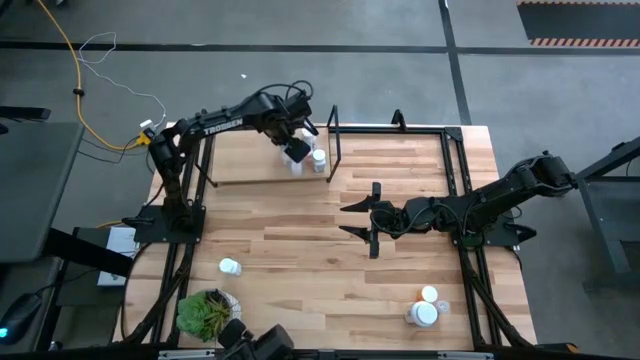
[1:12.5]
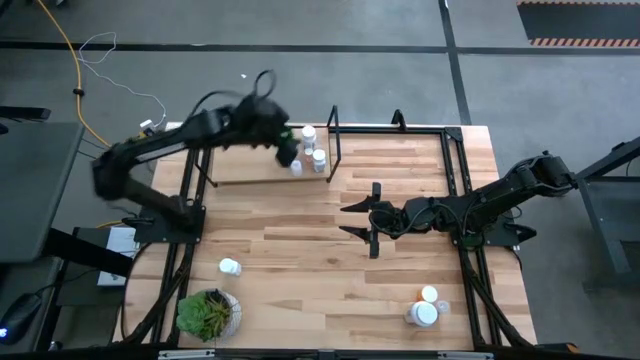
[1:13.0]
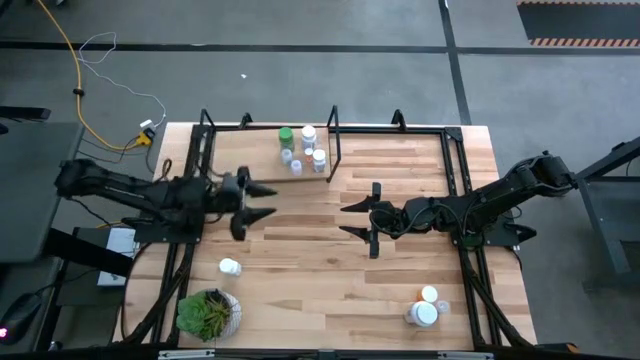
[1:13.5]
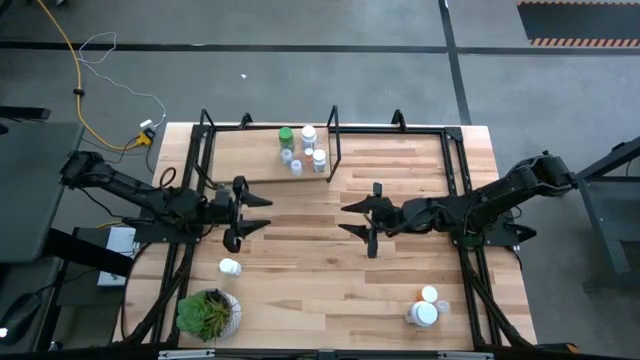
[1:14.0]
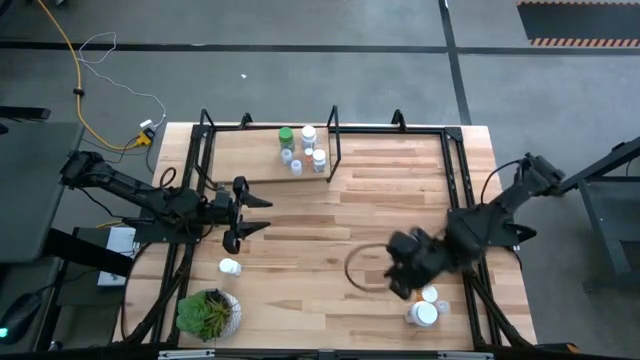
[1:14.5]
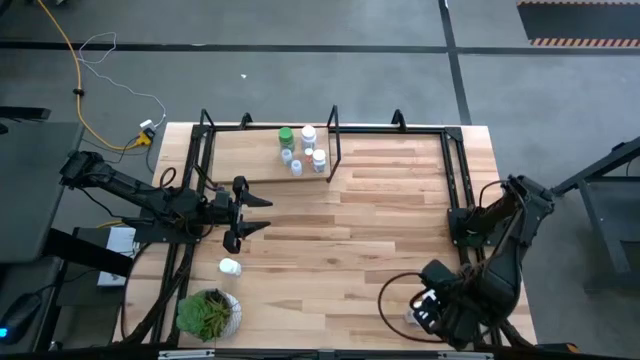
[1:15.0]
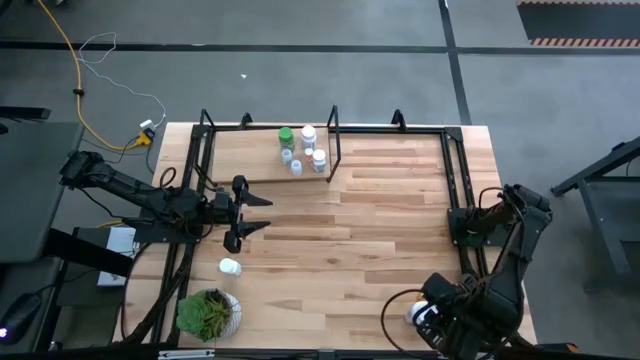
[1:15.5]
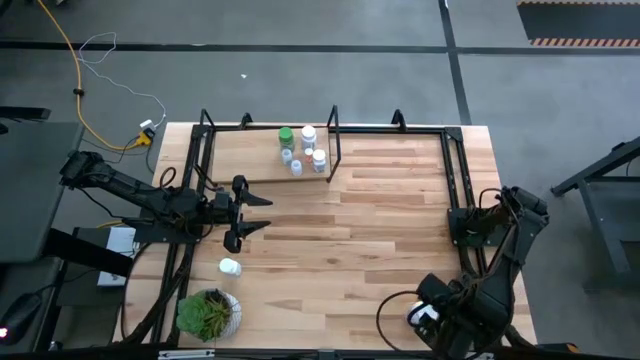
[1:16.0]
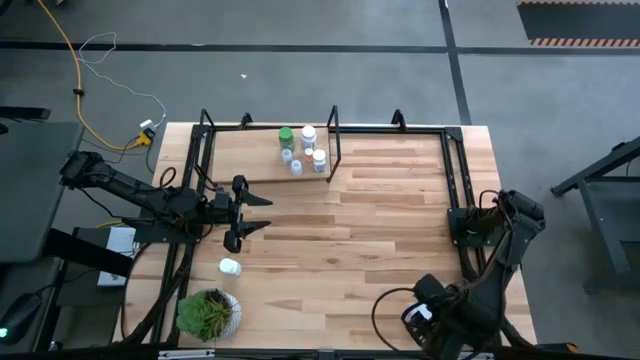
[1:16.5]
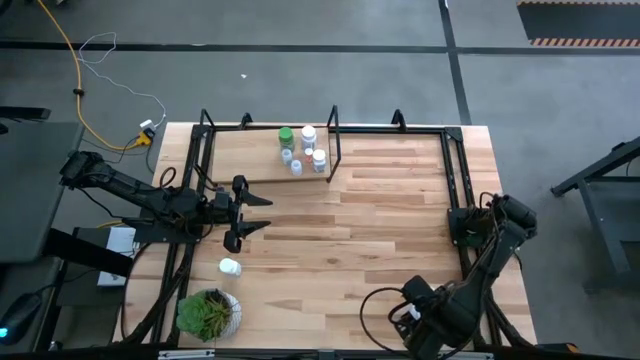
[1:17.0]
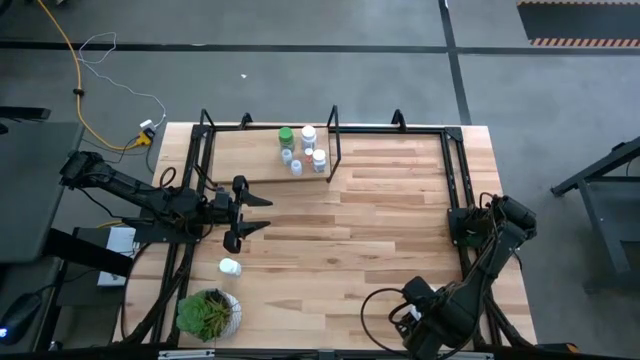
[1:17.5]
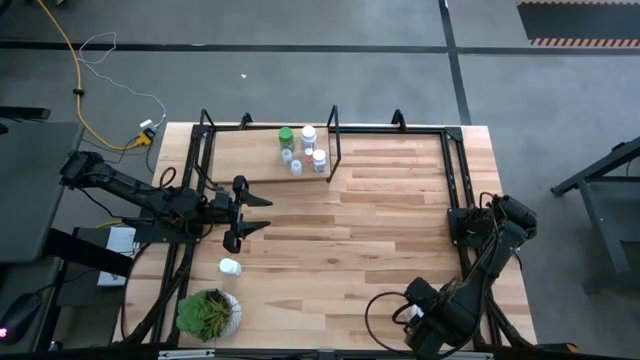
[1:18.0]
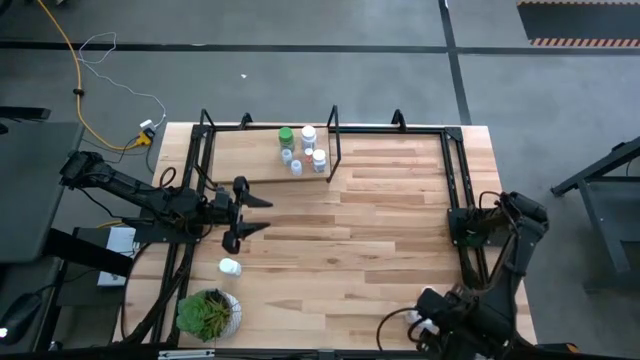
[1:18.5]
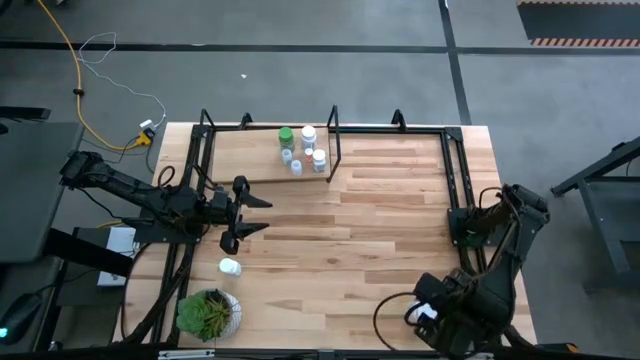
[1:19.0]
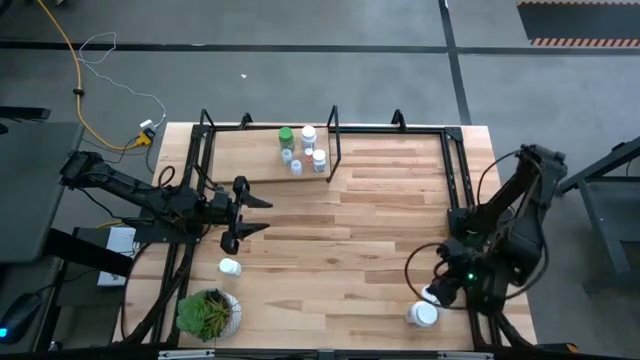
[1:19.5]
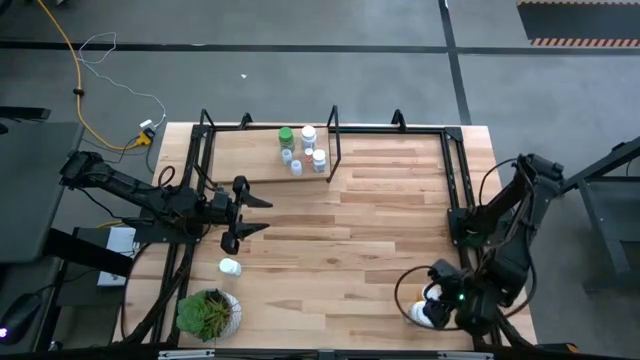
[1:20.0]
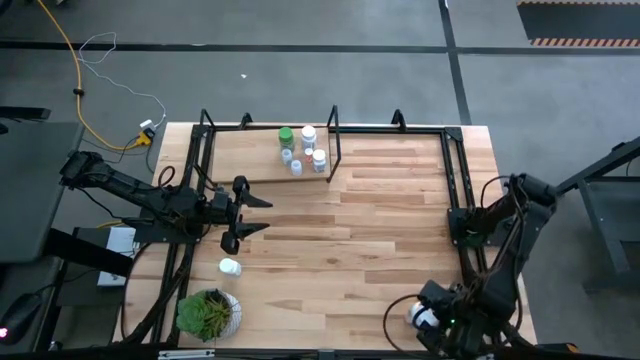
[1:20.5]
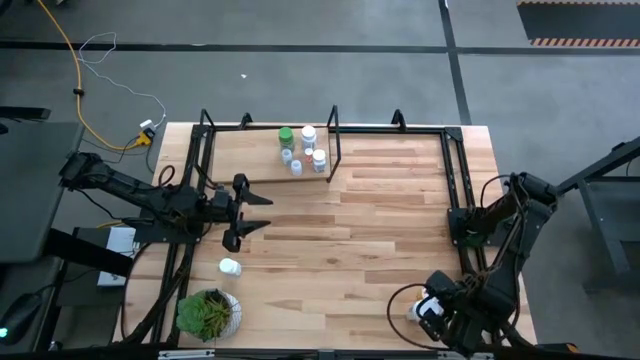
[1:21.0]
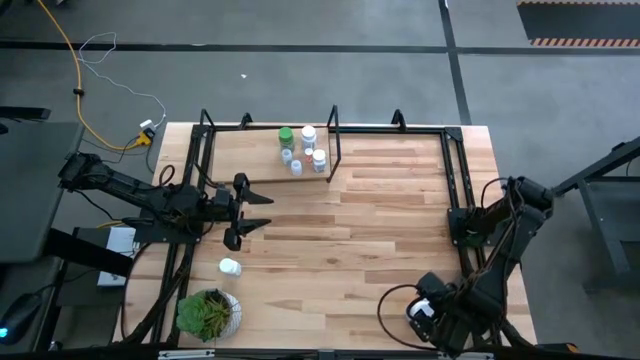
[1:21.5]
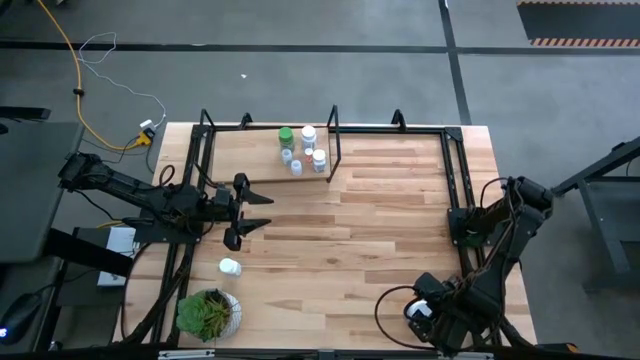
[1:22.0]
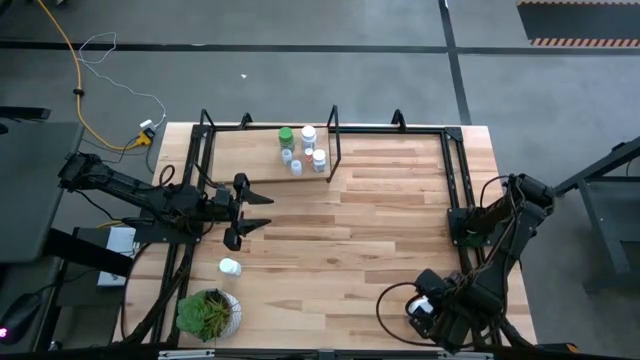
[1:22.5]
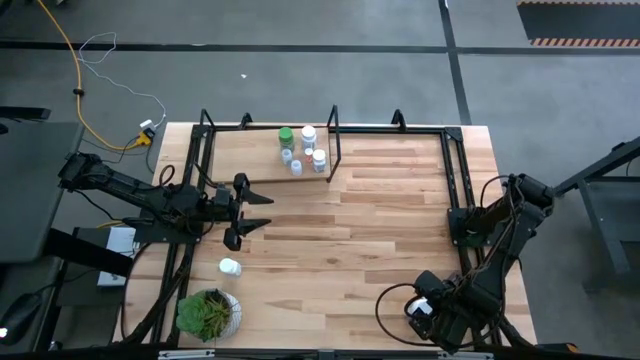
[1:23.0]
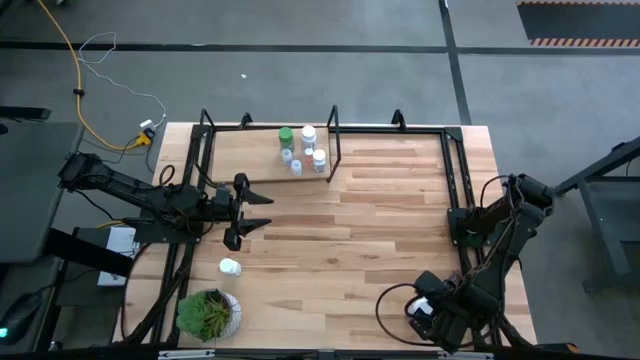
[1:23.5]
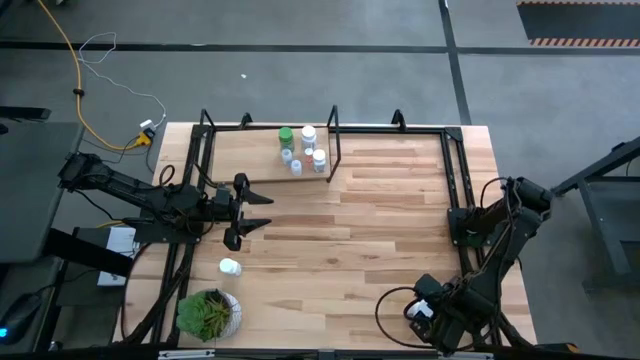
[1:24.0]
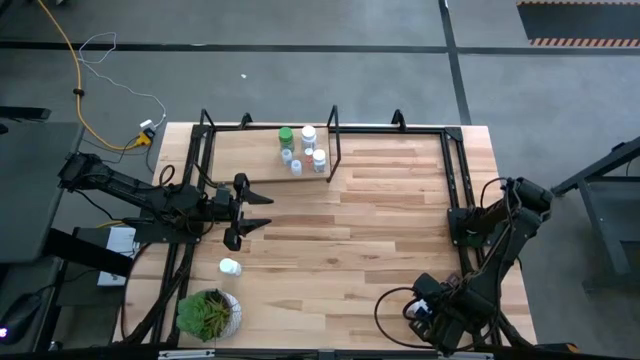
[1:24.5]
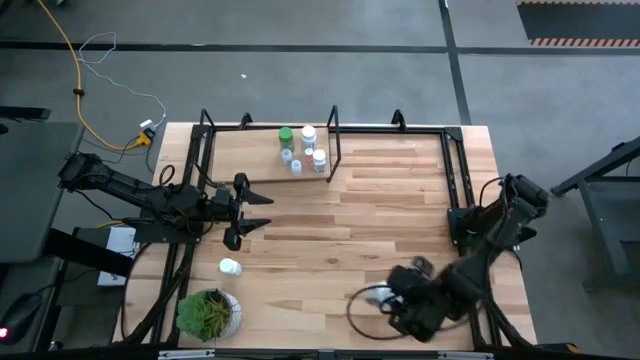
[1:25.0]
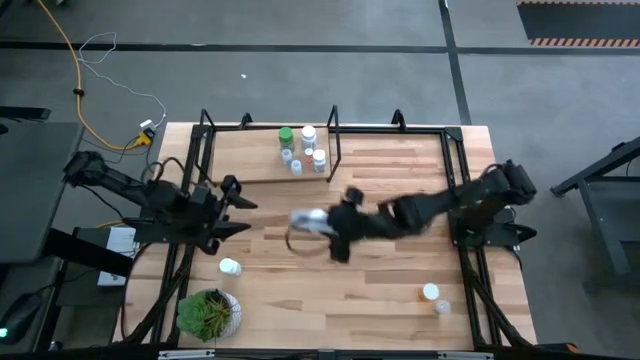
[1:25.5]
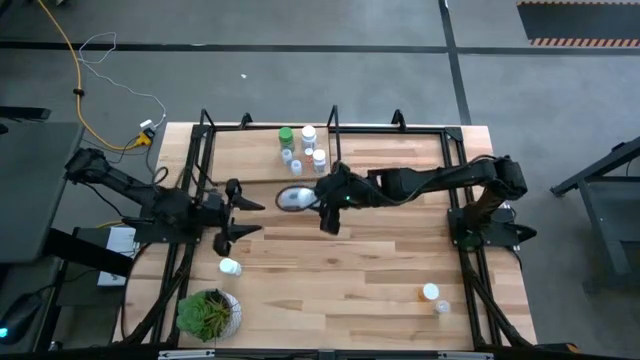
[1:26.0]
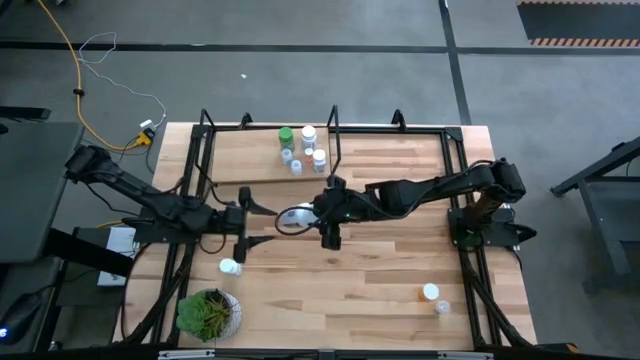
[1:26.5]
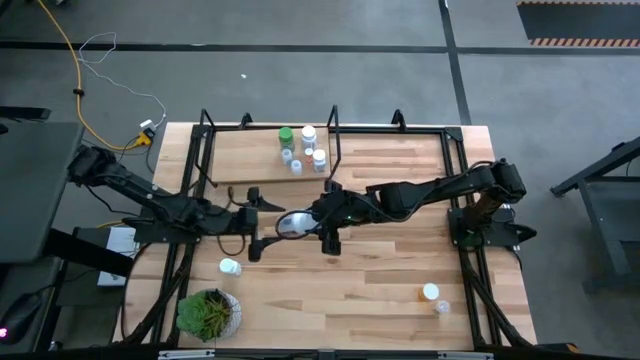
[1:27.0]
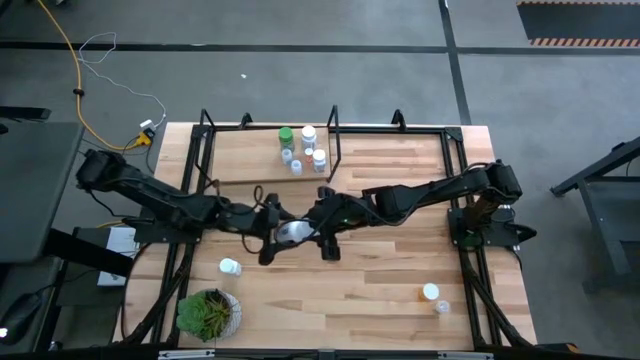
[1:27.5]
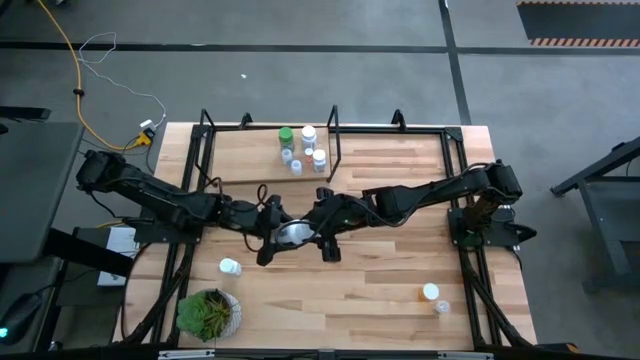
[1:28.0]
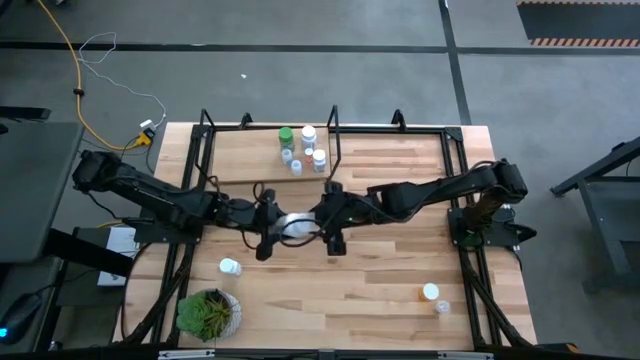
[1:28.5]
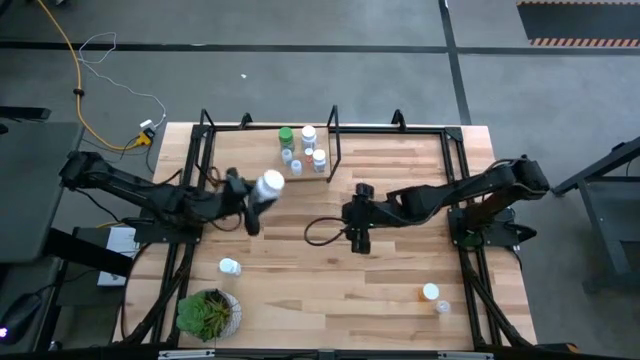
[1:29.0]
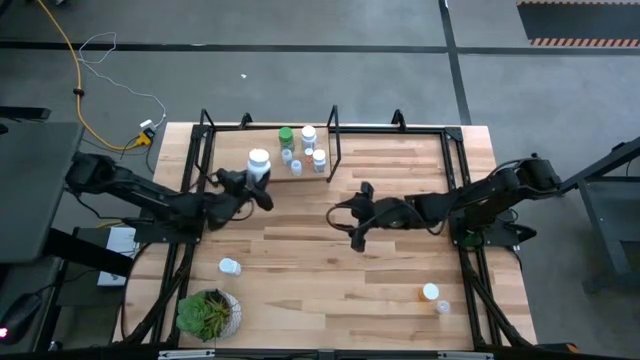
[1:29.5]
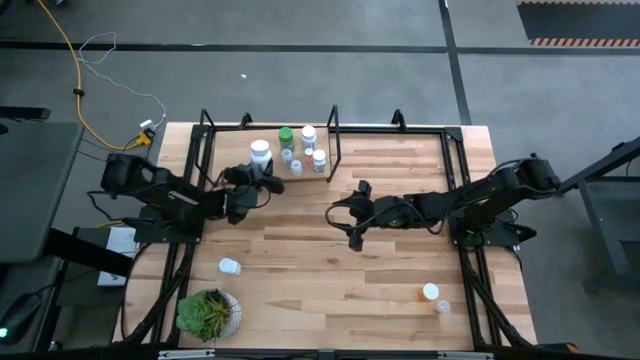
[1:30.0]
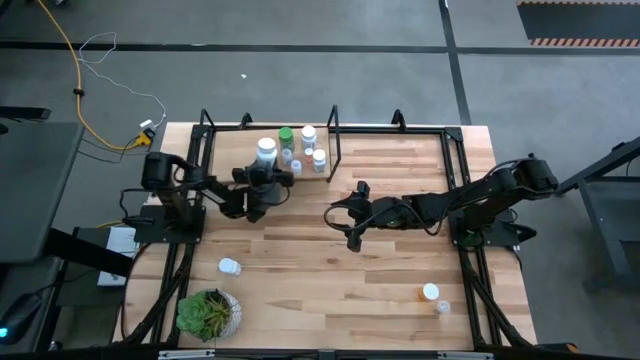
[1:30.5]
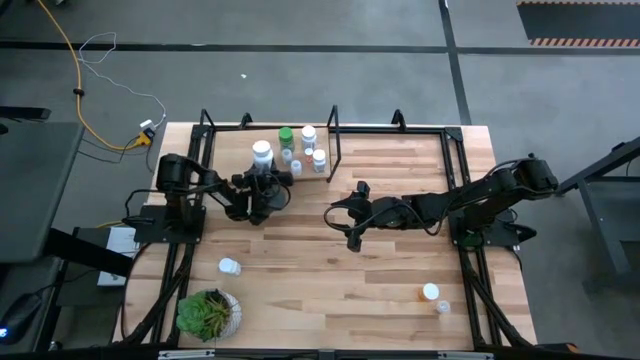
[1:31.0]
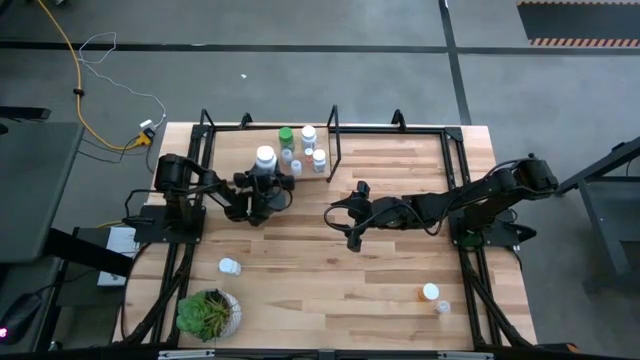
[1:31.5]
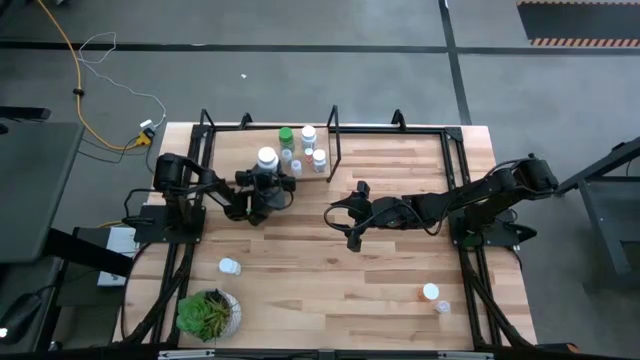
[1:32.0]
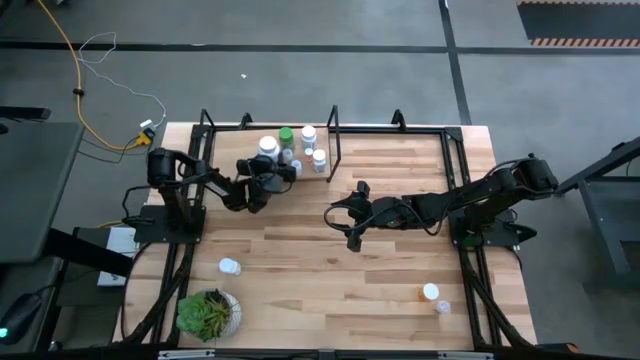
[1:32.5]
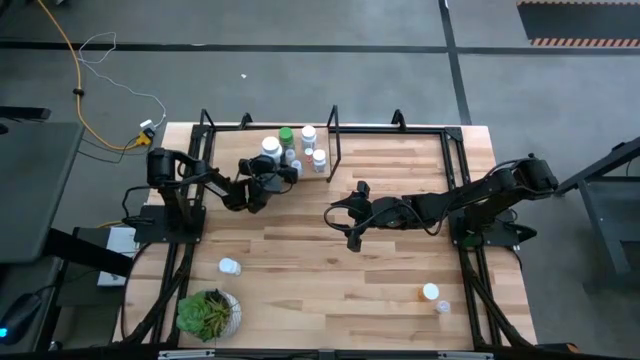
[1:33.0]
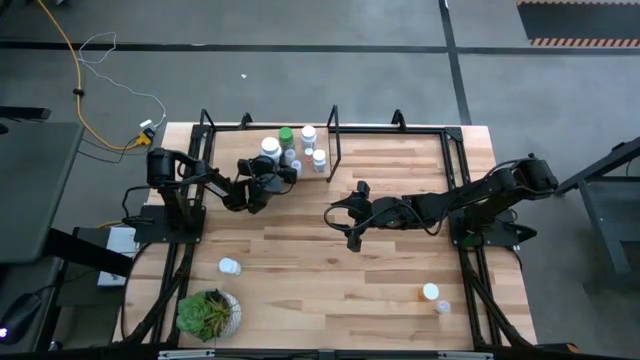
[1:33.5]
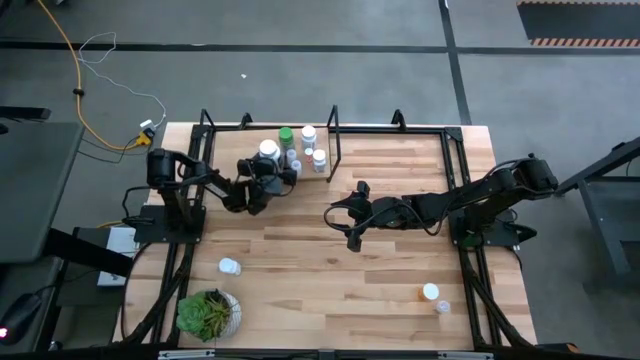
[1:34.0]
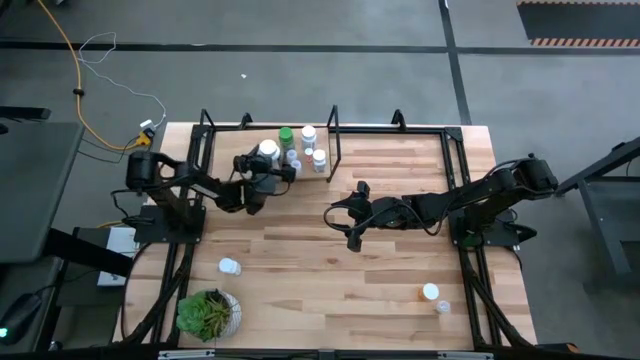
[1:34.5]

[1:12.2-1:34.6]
Task: Pick and place medicine bottles onto shelf by color
Put the big red and white pill bottle on the shelf
